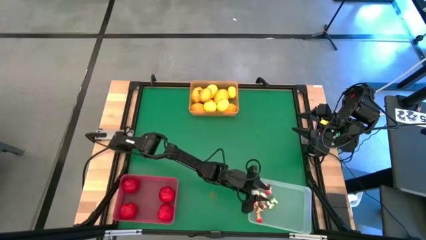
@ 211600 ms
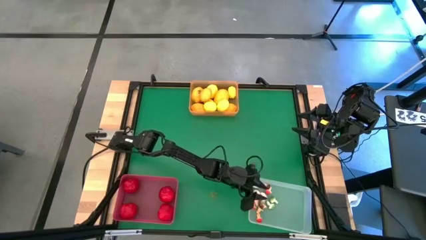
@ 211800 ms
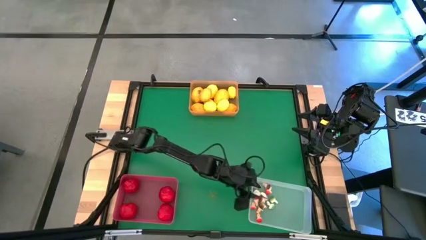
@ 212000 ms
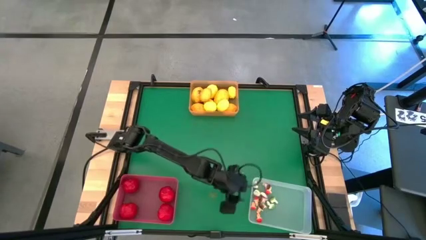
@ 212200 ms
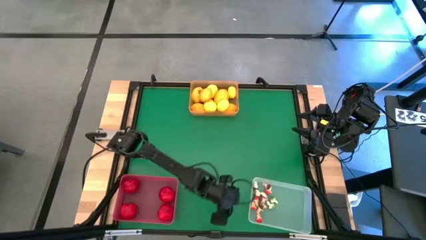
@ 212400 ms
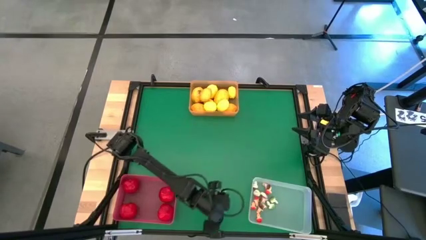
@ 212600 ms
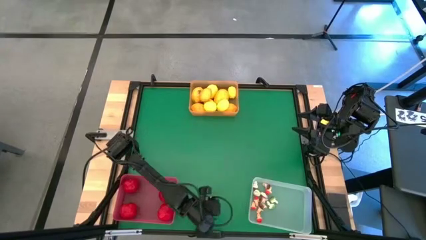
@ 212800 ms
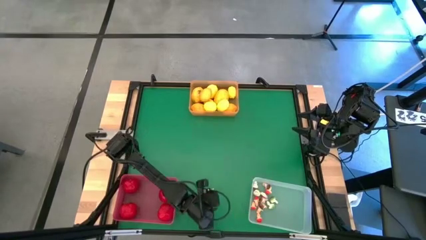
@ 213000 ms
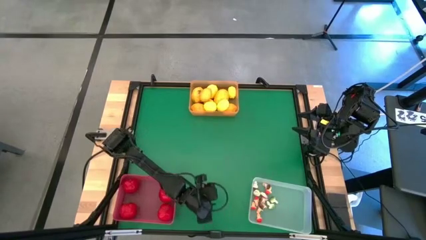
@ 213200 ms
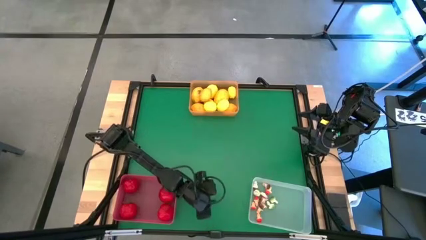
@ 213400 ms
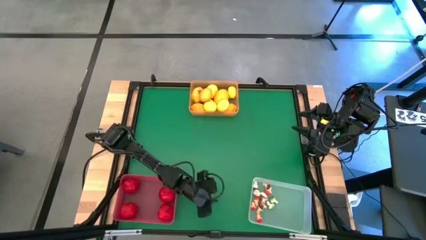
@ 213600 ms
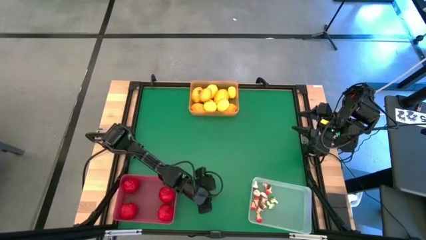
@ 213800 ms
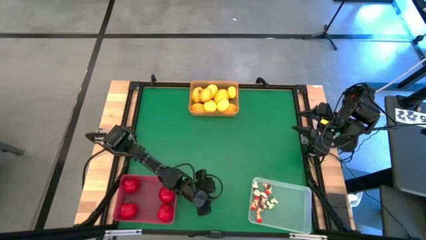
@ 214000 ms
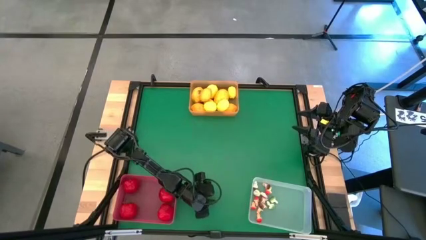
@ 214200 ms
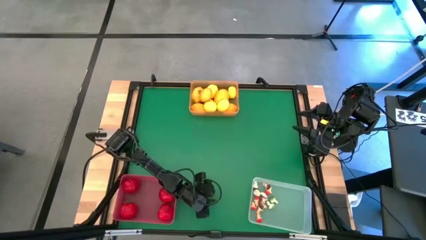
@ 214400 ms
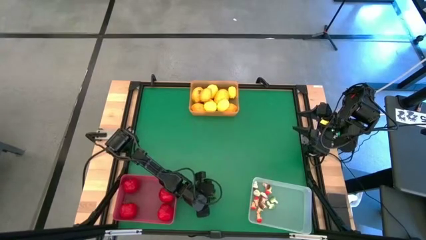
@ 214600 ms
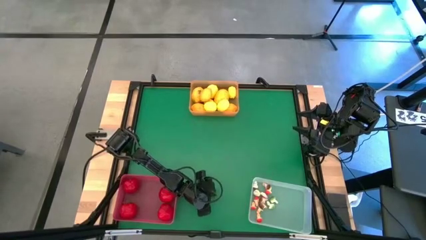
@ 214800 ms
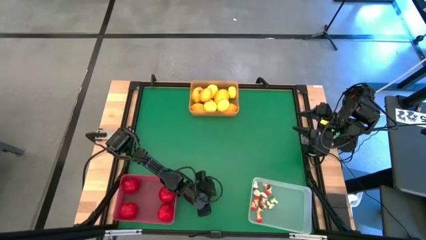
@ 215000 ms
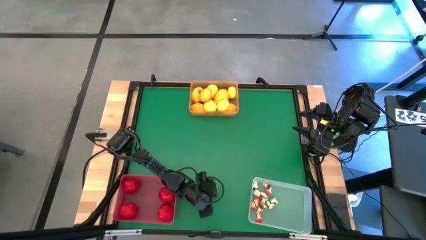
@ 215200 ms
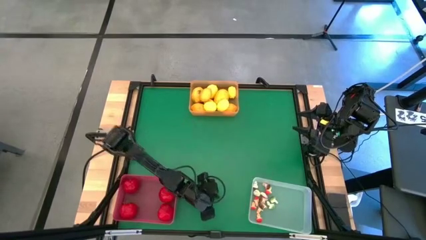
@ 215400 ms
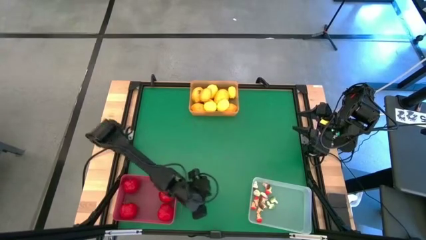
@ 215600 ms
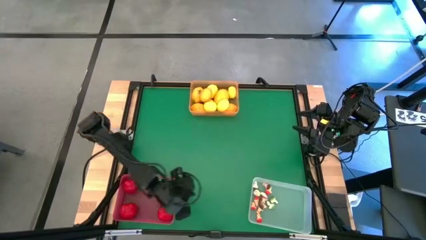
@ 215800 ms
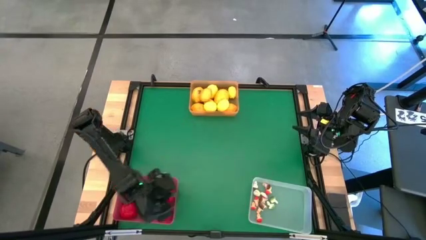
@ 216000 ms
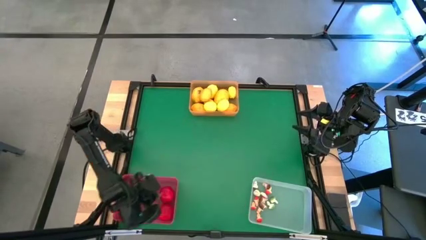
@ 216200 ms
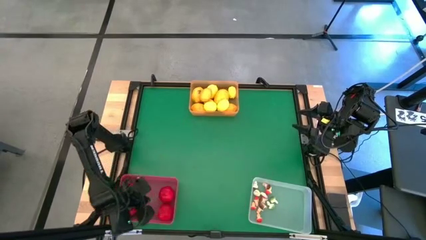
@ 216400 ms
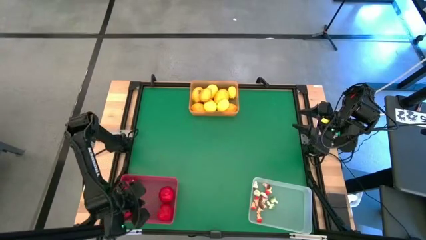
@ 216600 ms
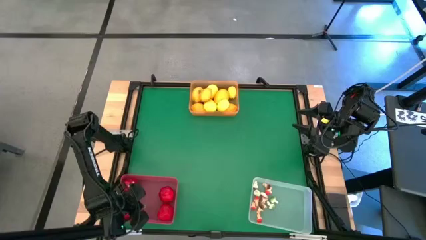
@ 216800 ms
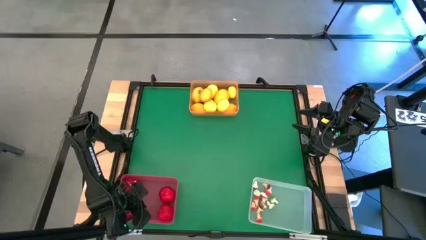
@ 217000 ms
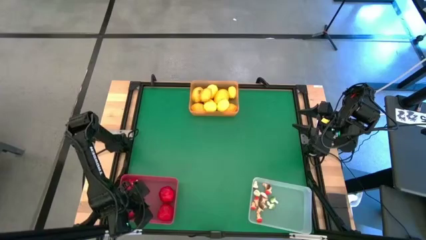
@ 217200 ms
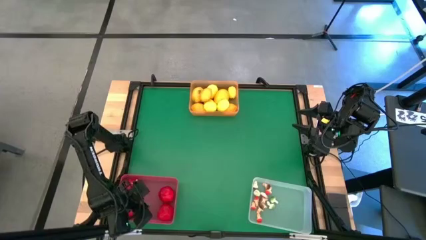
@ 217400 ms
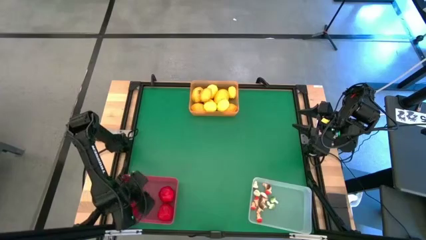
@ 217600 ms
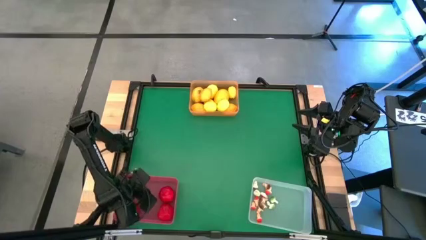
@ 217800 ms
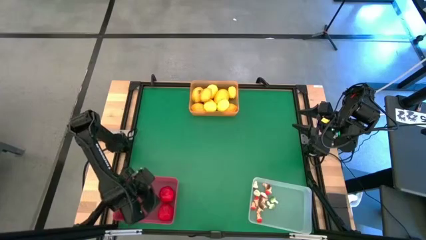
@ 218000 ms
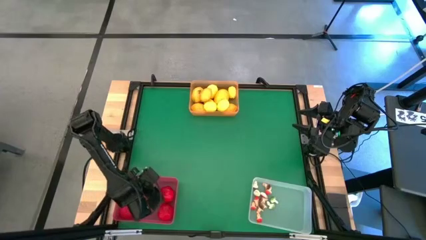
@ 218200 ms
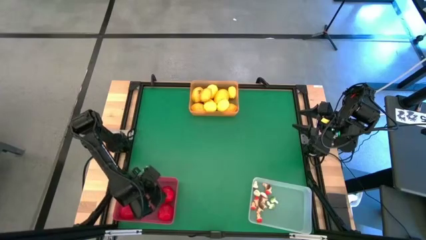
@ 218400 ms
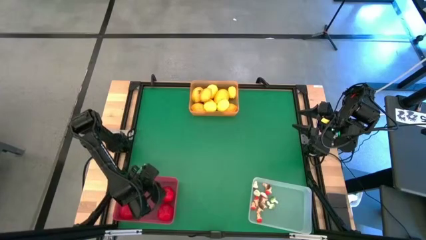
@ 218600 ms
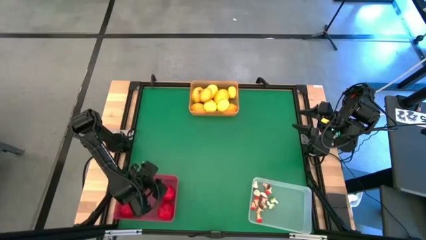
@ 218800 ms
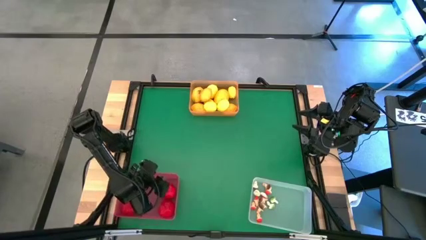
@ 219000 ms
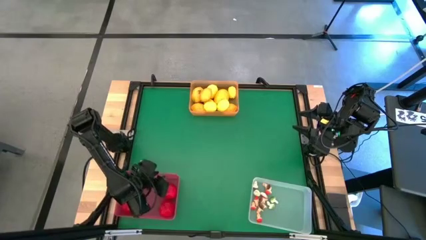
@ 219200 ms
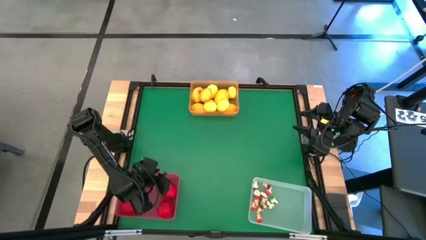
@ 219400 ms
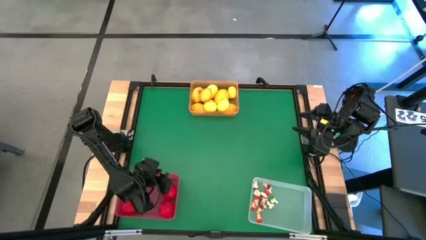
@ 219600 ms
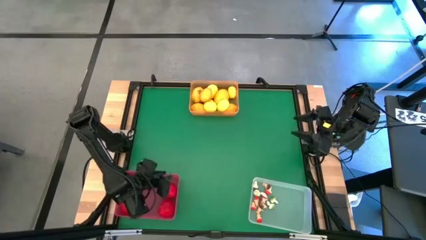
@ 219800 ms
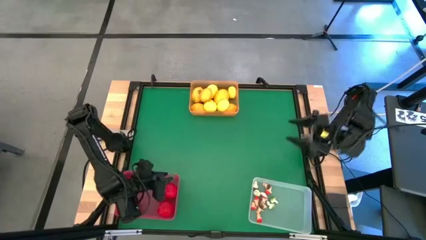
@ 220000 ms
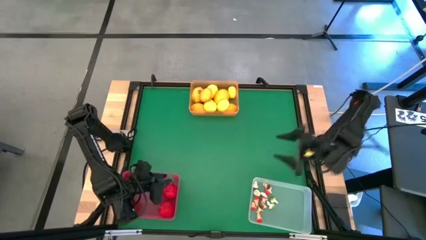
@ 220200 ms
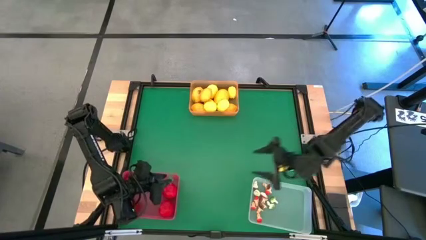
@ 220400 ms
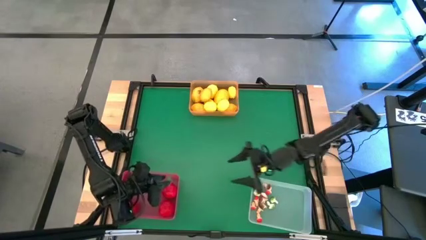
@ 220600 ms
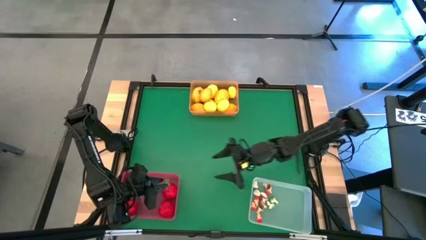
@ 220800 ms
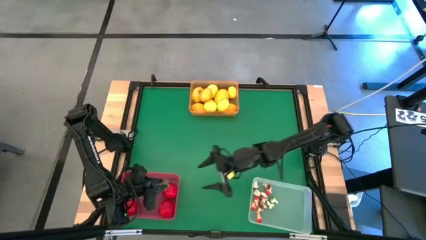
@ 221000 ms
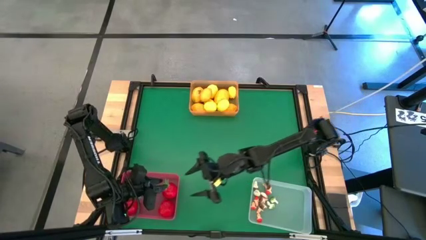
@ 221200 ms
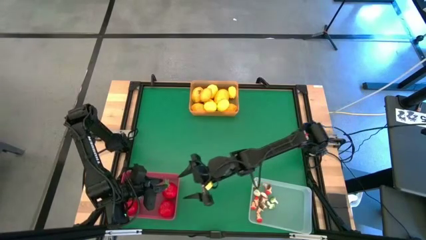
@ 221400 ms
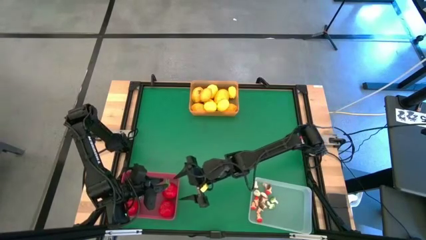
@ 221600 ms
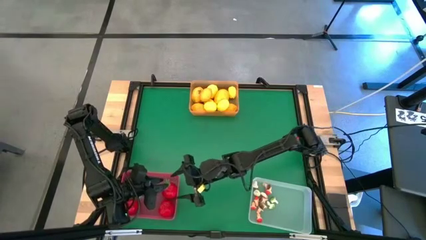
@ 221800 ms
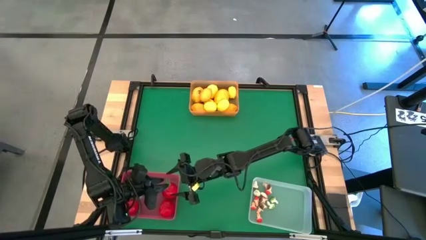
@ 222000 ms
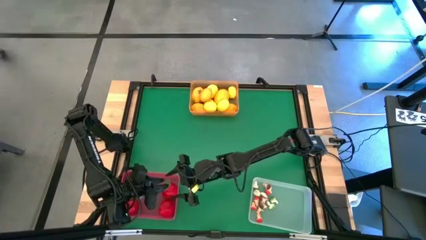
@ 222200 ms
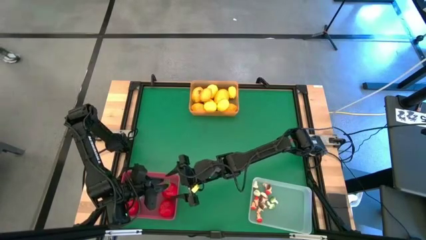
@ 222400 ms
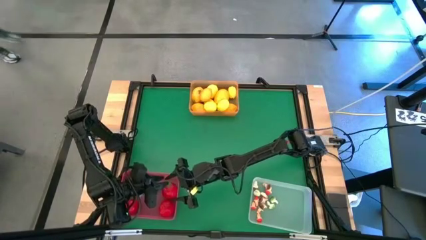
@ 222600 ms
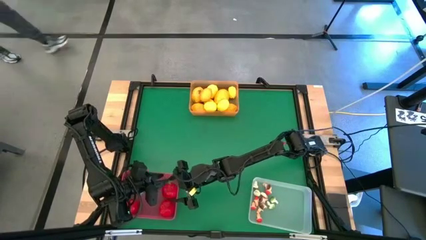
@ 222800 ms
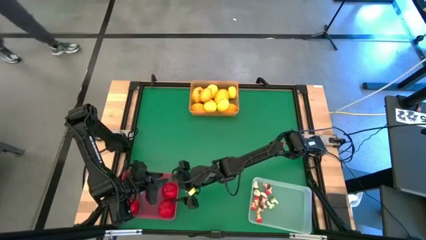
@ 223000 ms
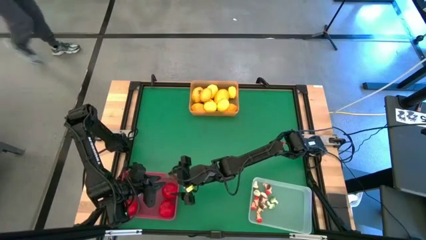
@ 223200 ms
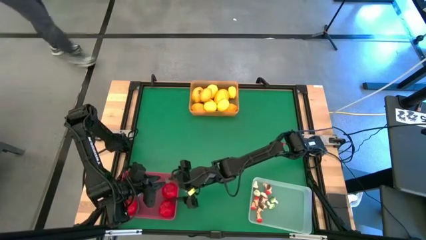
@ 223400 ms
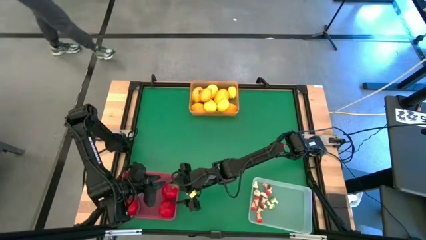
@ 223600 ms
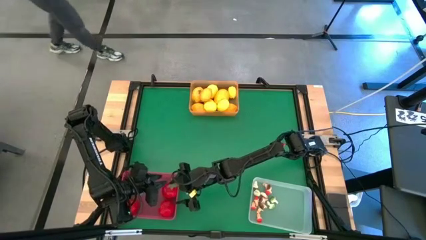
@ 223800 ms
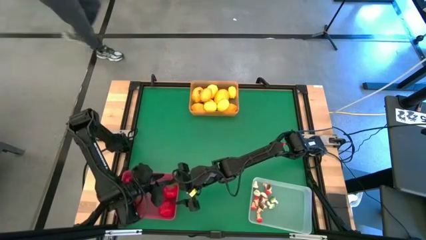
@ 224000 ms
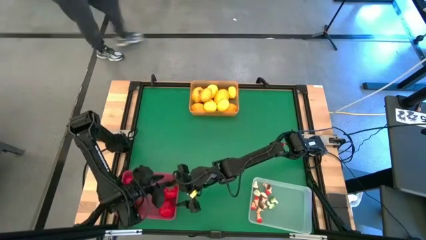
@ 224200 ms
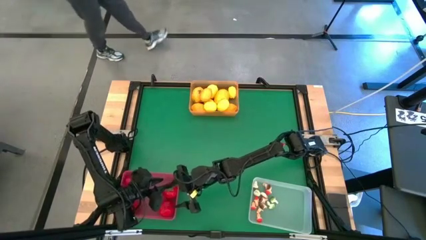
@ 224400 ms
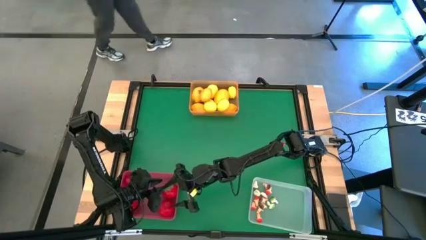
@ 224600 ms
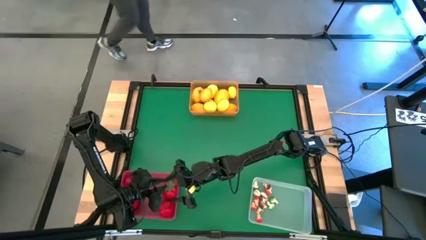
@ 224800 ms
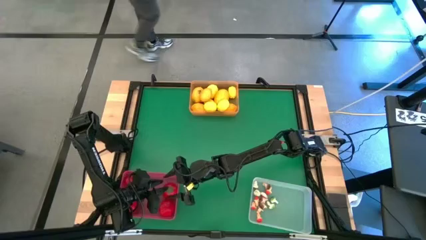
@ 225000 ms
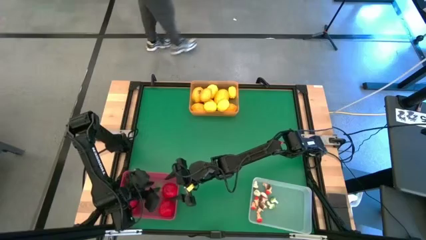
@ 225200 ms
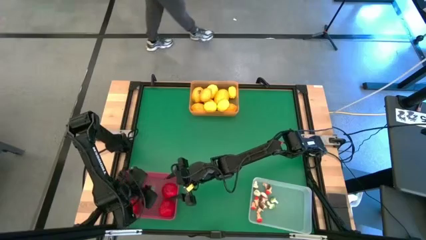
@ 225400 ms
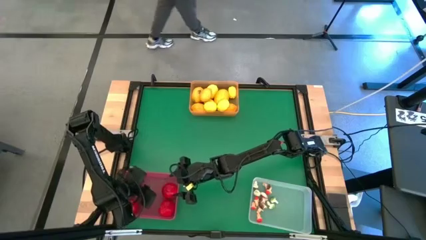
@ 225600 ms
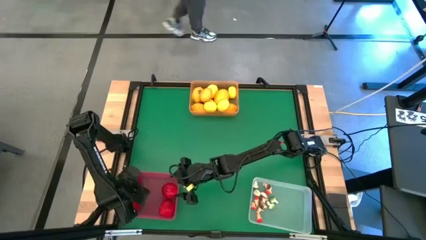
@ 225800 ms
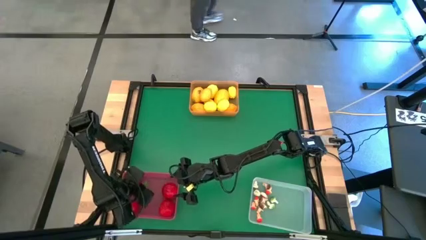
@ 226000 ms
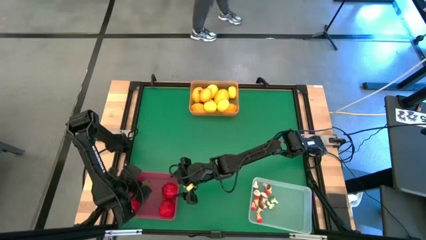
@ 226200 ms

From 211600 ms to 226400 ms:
Task: Sort produce into baskets
Put the tomato leaf into the red bin
